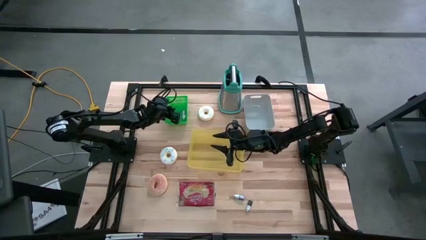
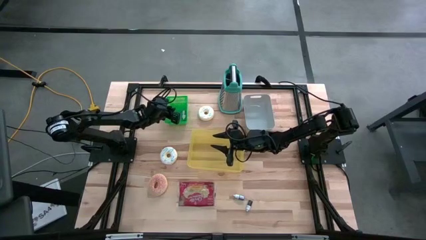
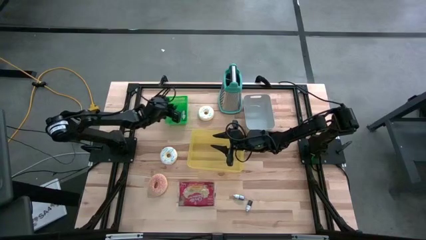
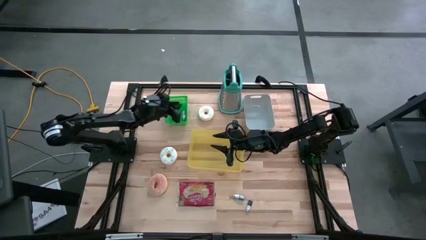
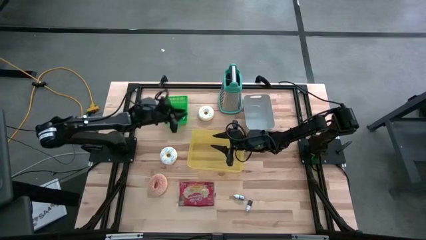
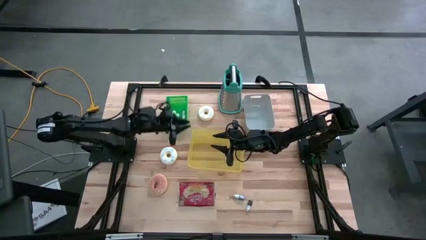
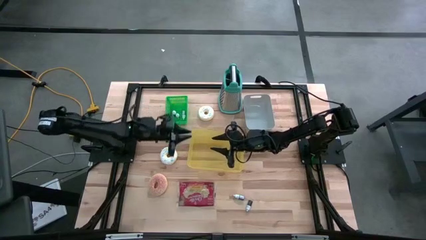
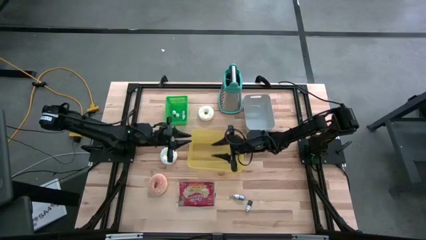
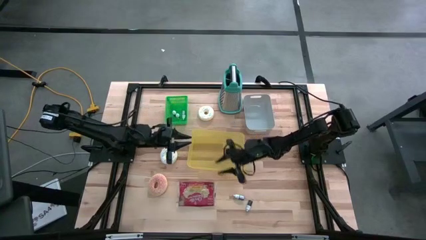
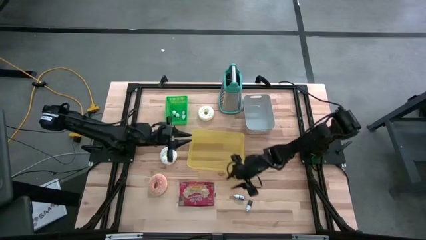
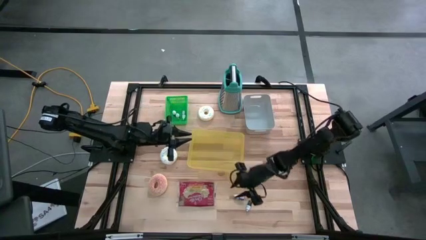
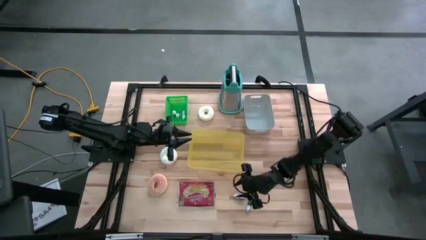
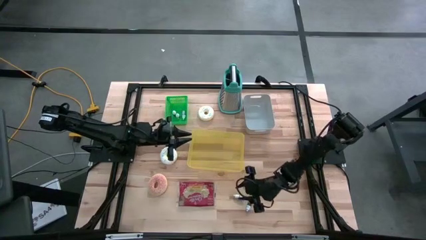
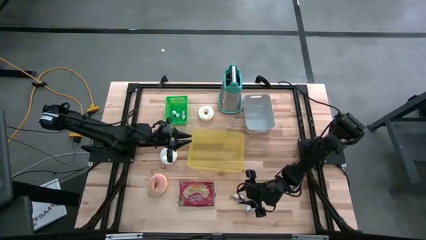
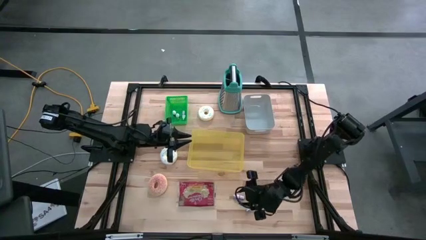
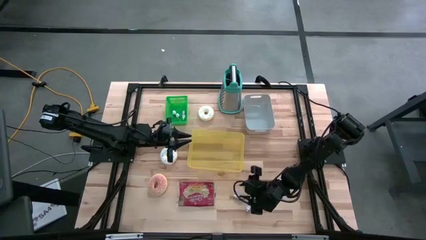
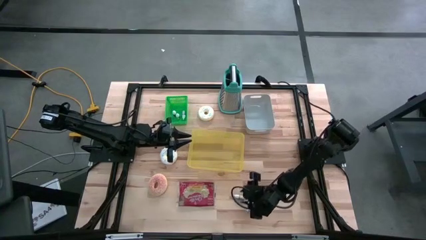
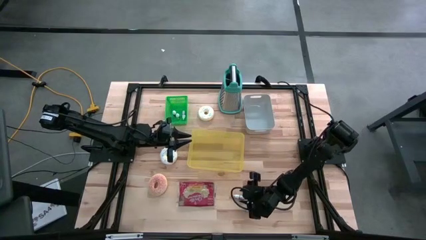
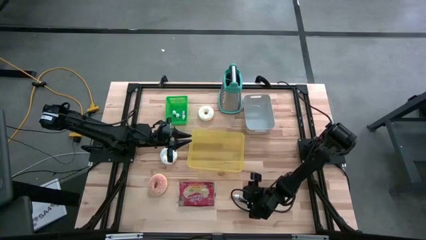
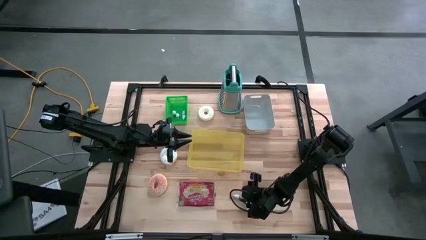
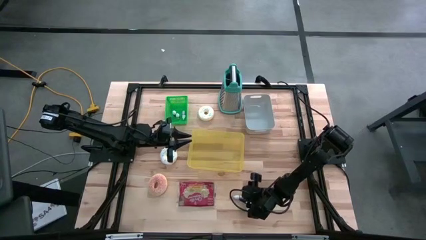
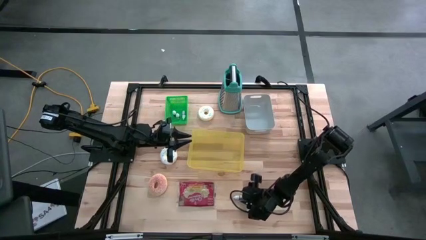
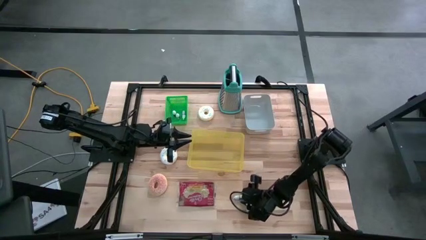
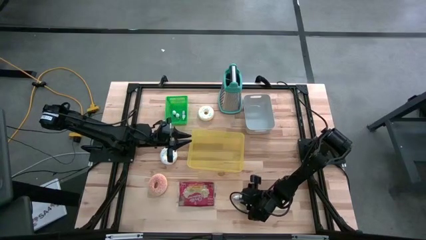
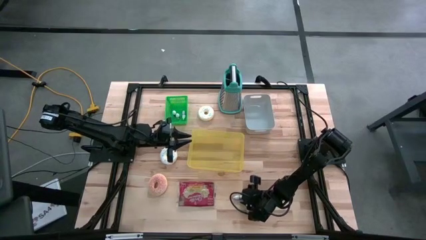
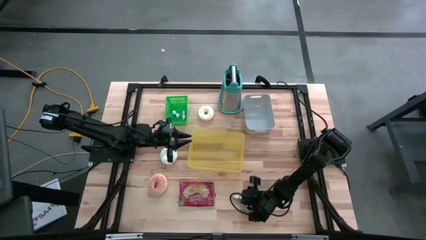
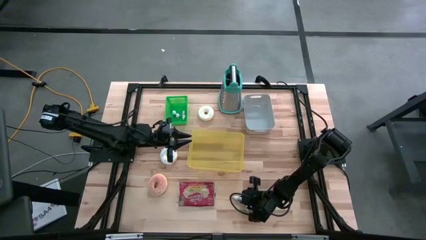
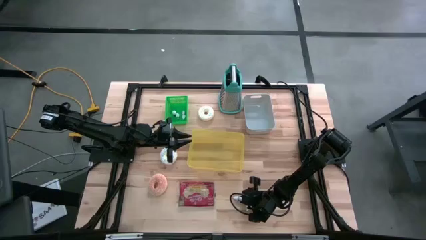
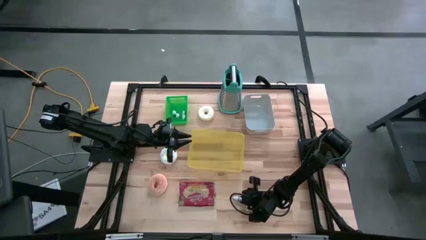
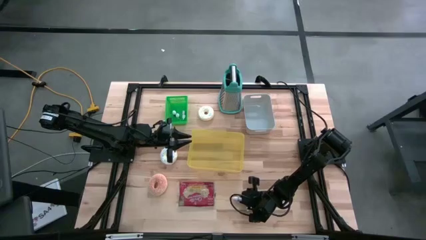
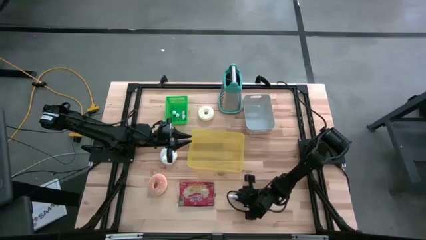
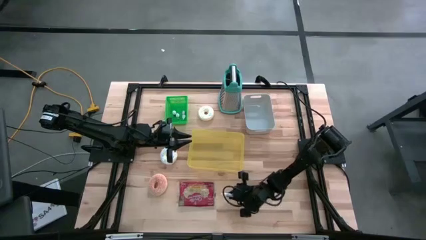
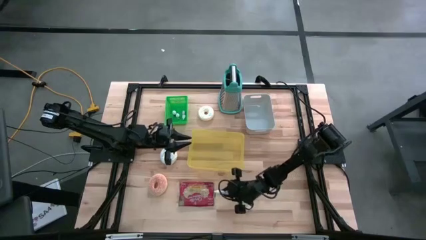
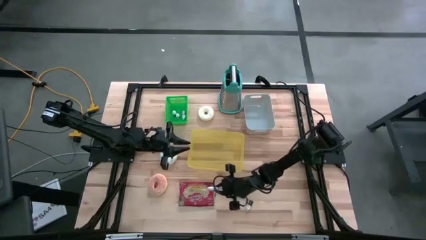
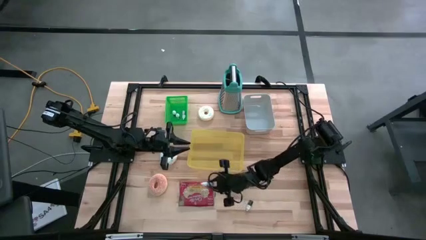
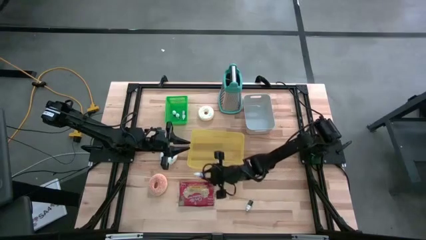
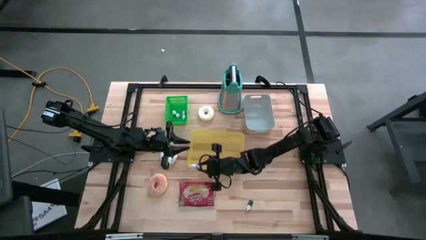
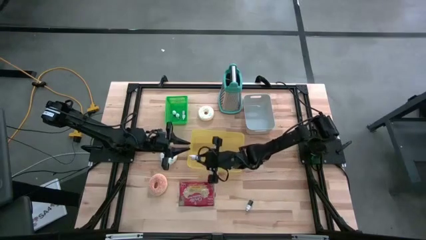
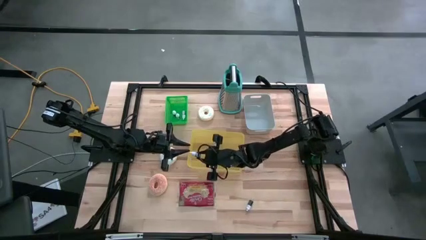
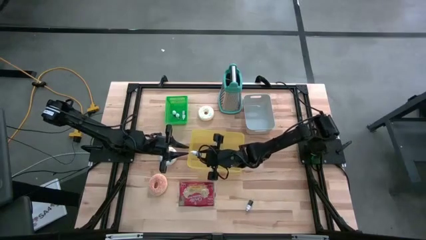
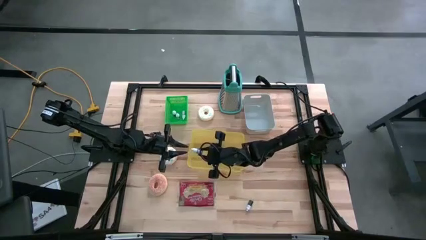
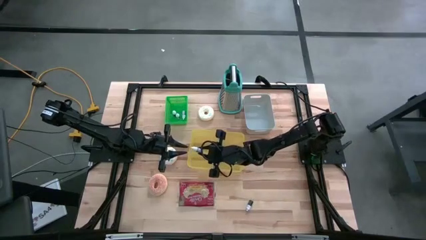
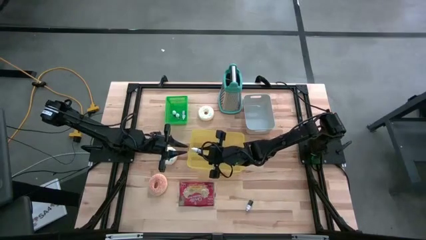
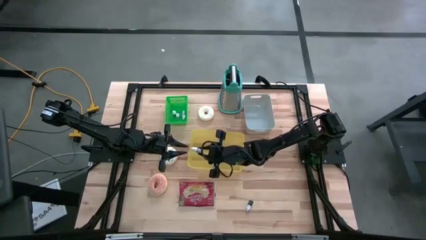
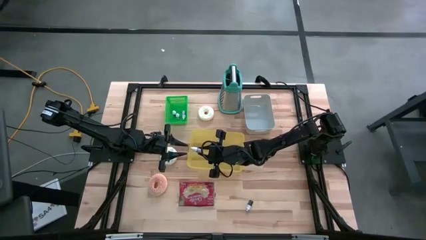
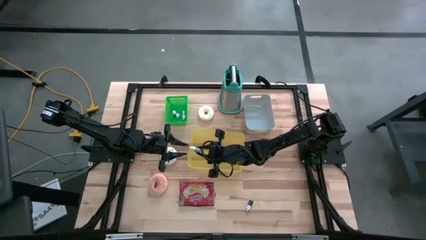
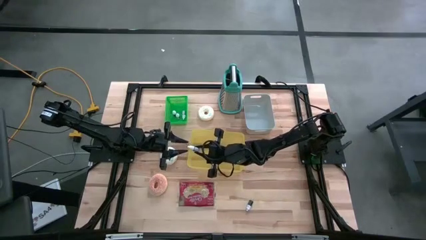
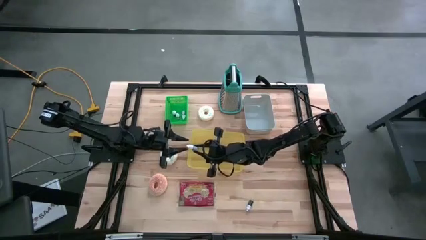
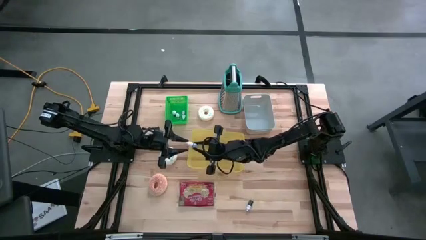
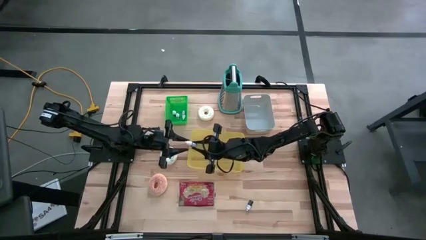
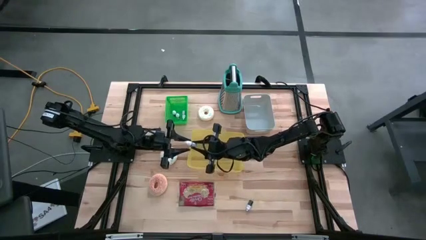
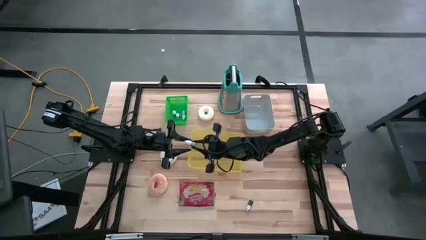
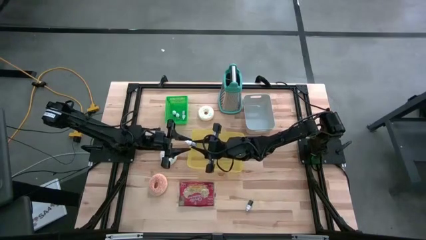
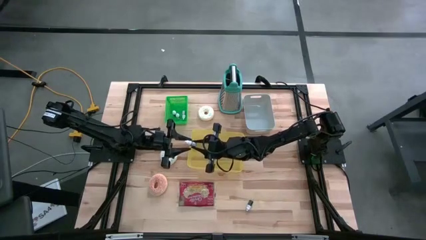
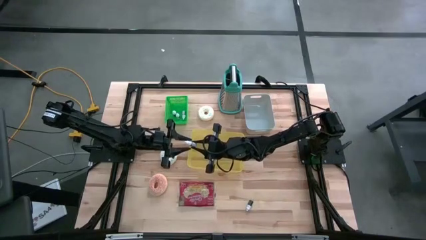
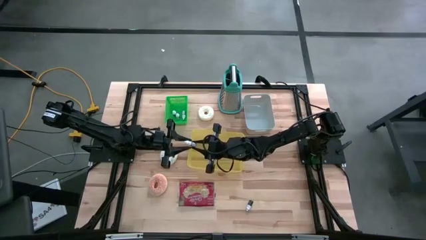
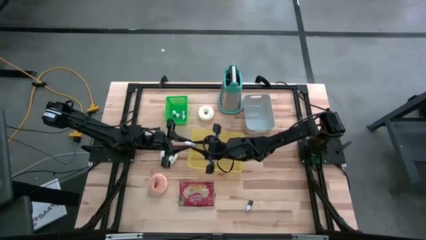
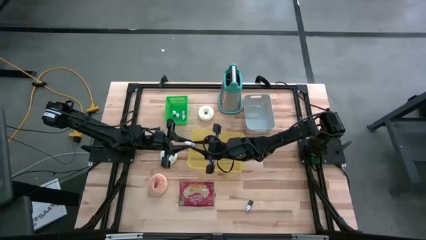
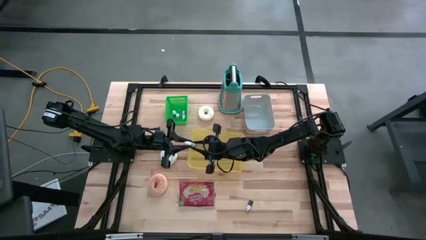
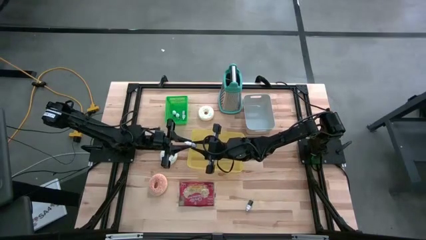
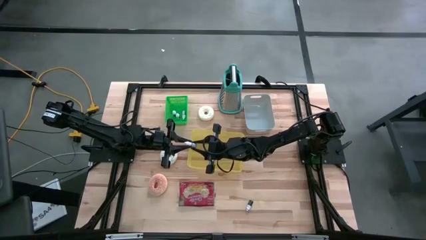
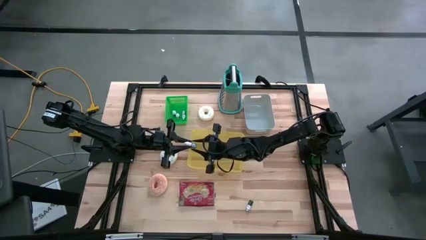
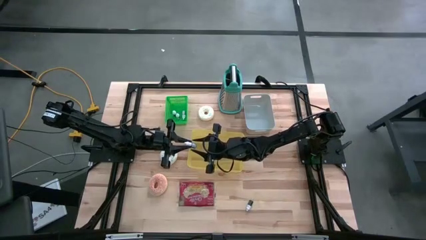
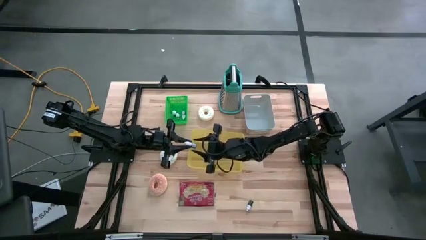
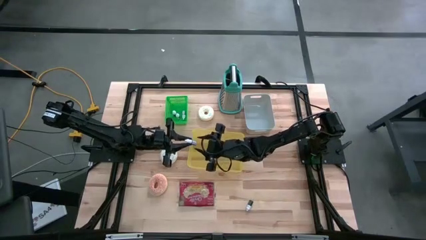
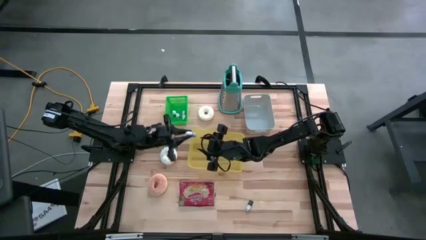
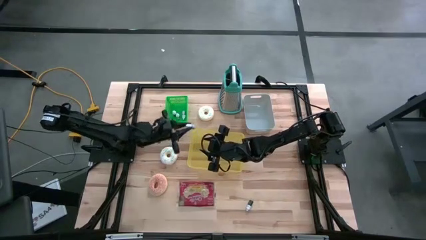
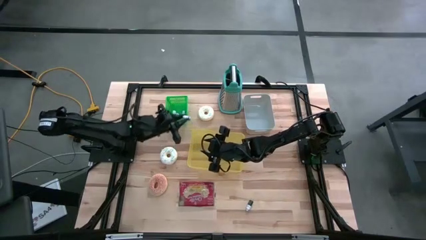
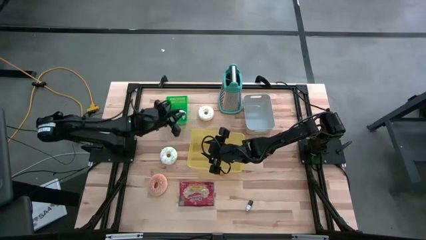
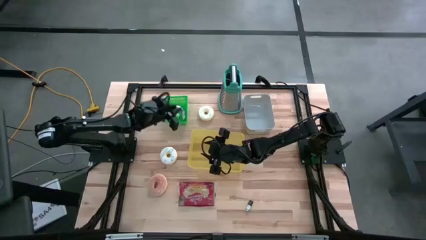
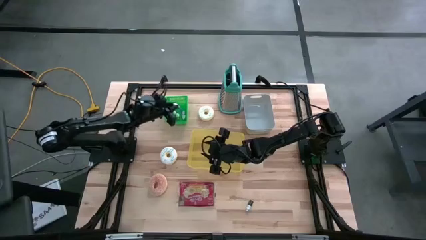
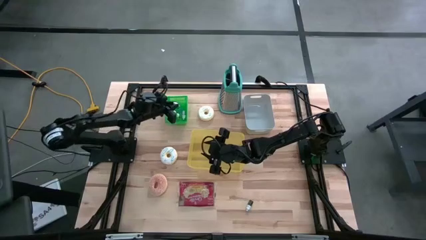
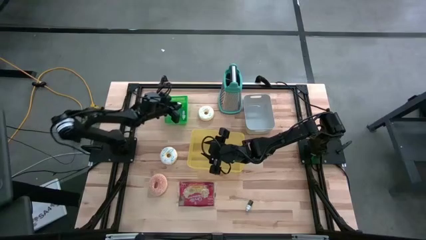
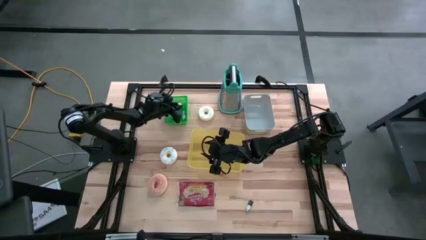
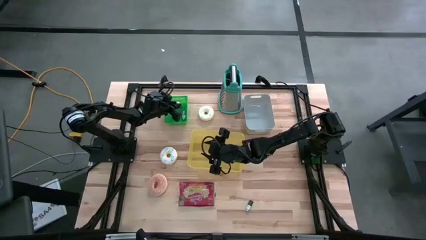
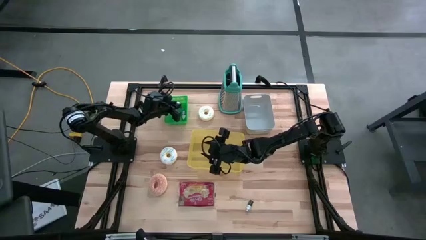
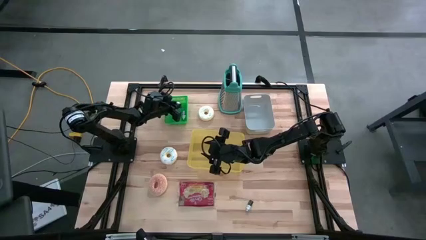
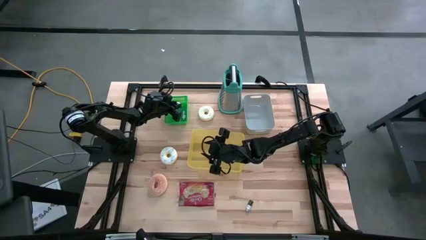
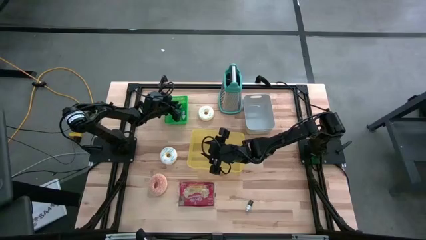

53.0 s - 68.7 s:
Put the purple food coloring bottle into the green bin
